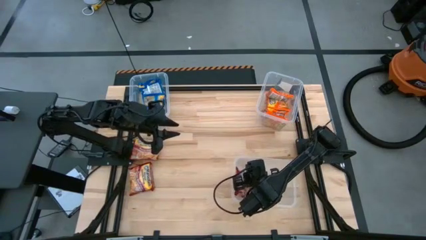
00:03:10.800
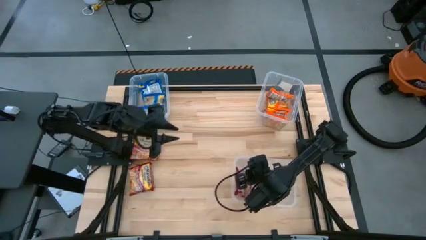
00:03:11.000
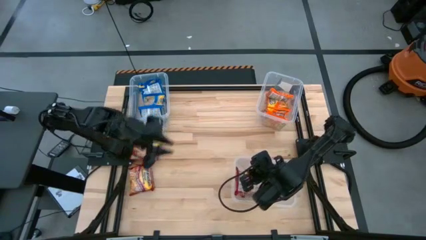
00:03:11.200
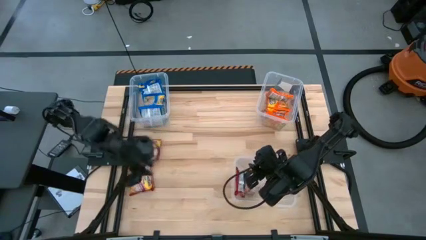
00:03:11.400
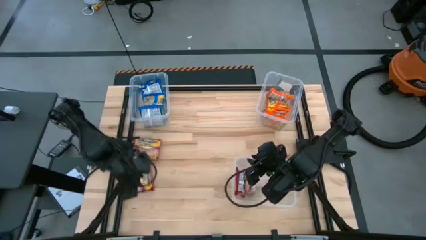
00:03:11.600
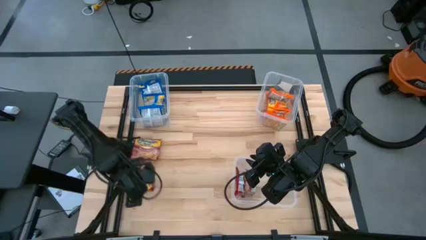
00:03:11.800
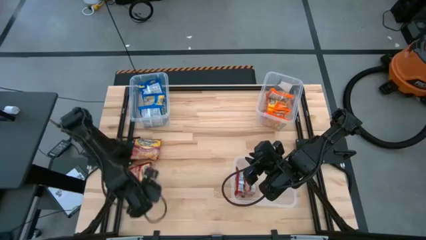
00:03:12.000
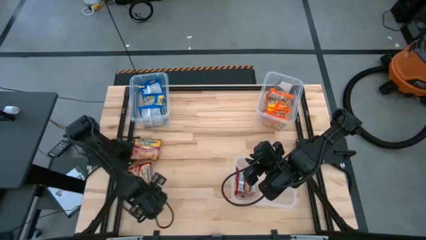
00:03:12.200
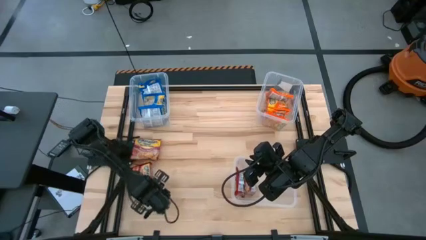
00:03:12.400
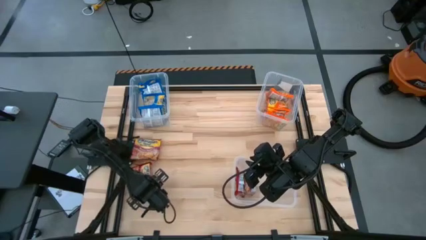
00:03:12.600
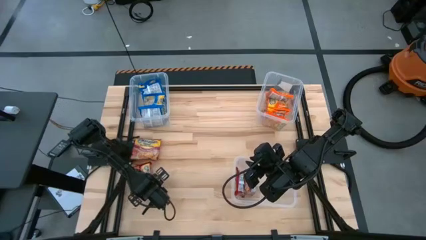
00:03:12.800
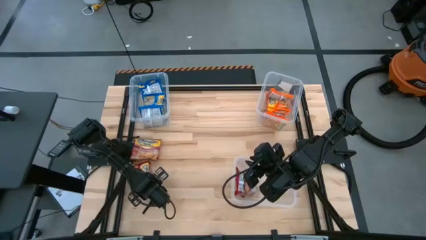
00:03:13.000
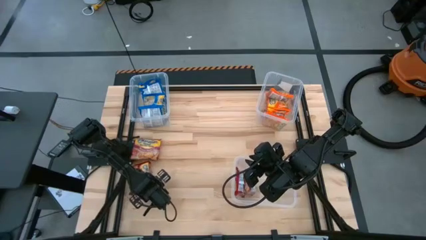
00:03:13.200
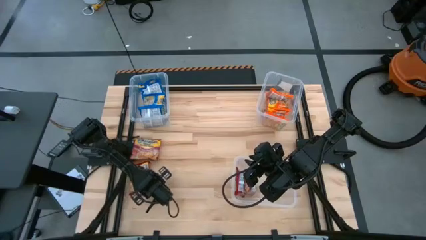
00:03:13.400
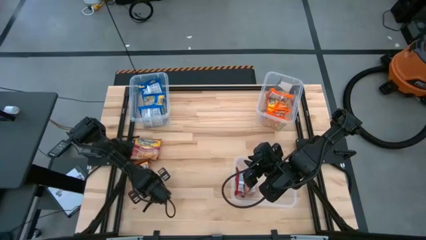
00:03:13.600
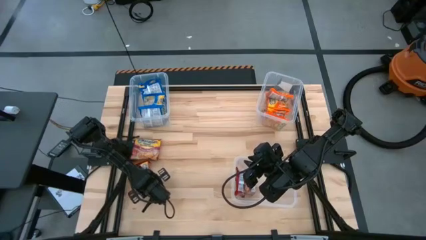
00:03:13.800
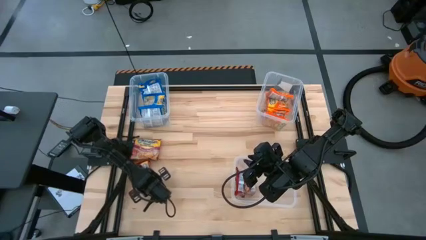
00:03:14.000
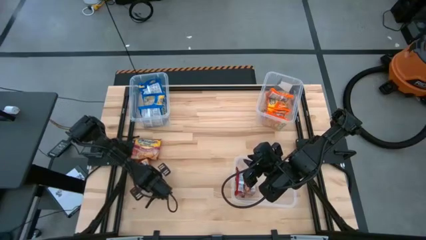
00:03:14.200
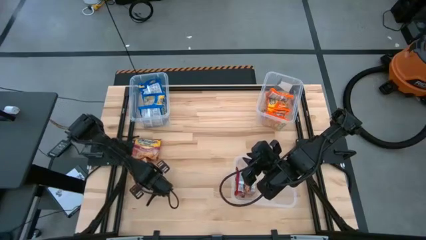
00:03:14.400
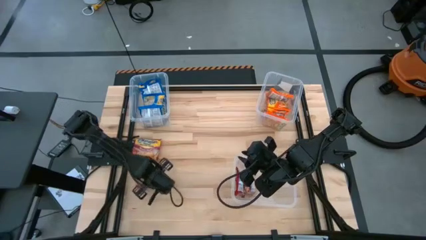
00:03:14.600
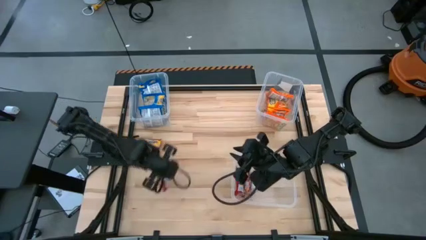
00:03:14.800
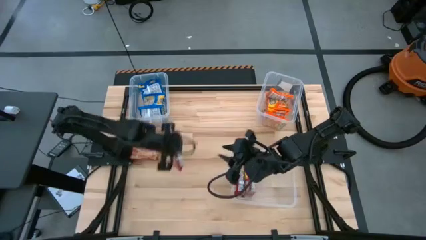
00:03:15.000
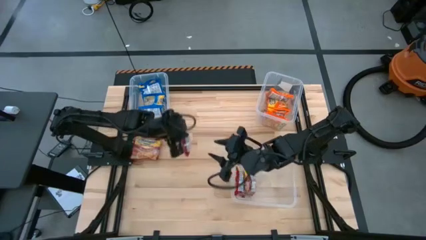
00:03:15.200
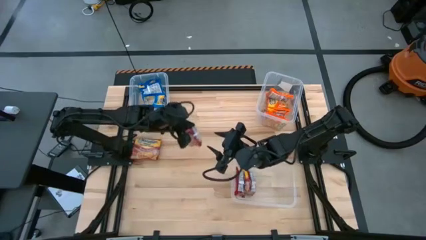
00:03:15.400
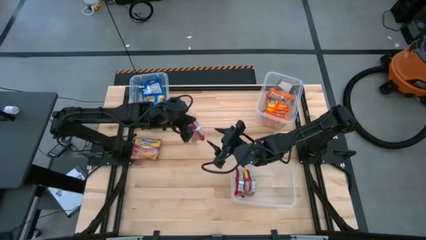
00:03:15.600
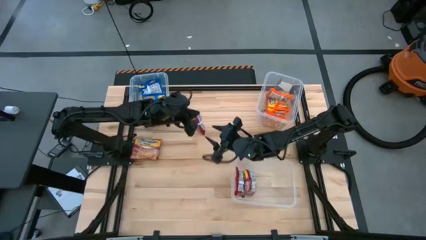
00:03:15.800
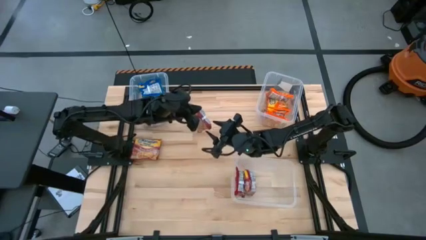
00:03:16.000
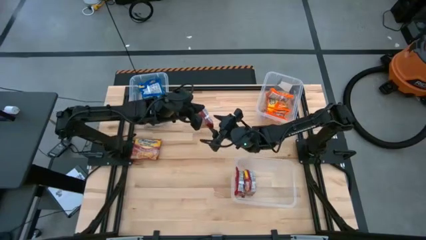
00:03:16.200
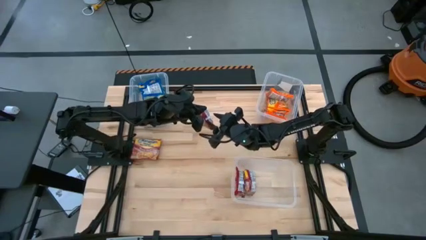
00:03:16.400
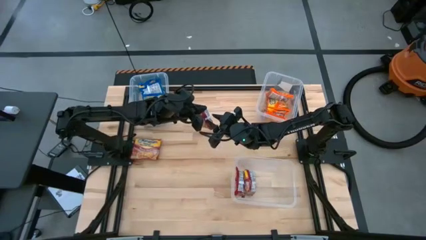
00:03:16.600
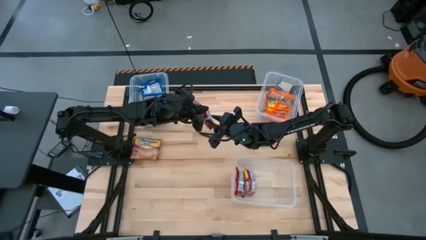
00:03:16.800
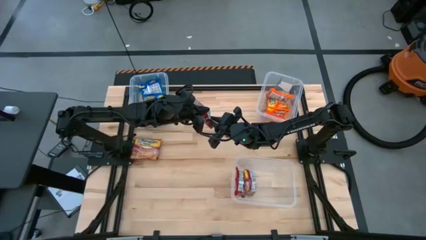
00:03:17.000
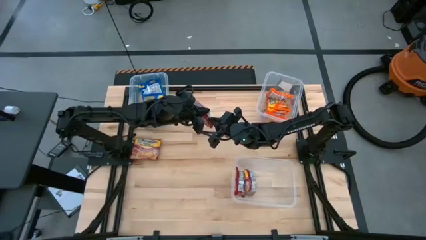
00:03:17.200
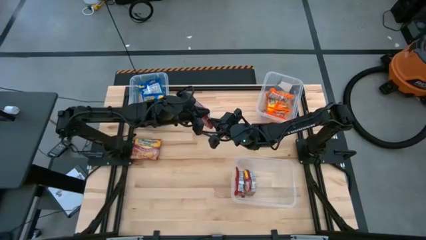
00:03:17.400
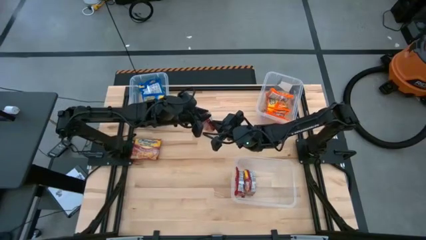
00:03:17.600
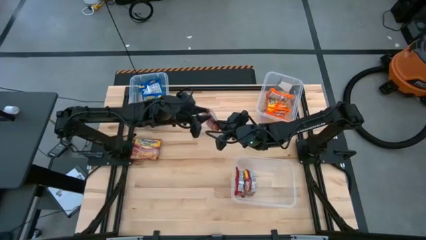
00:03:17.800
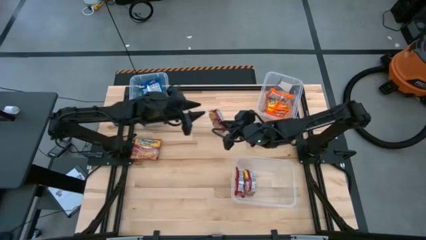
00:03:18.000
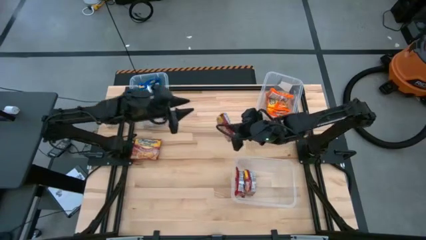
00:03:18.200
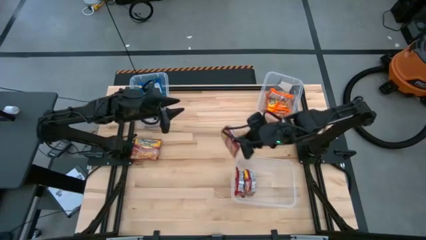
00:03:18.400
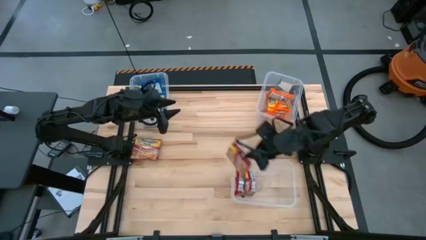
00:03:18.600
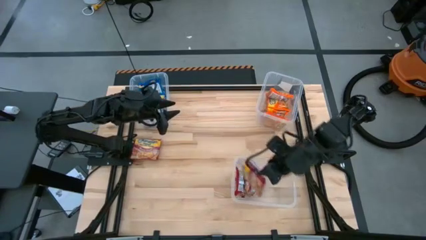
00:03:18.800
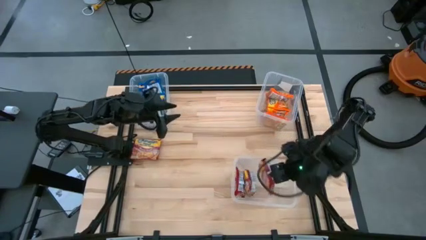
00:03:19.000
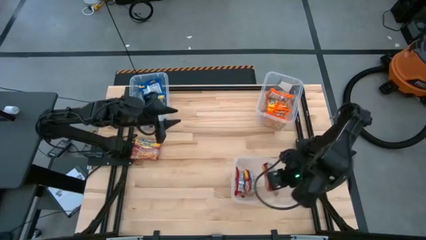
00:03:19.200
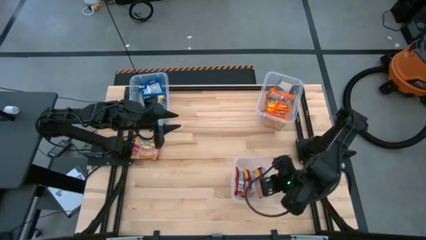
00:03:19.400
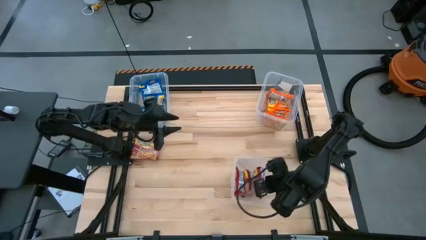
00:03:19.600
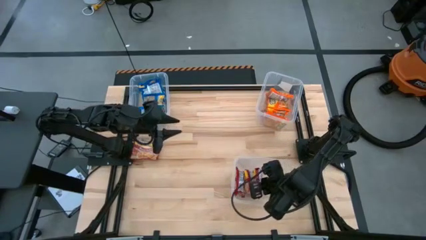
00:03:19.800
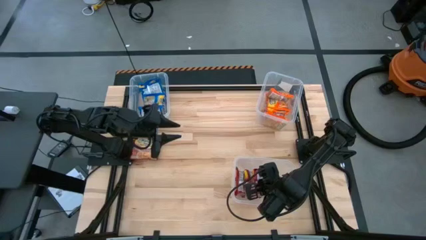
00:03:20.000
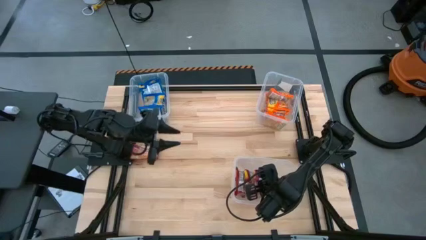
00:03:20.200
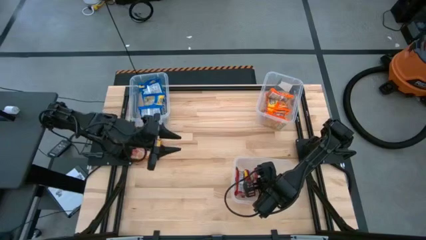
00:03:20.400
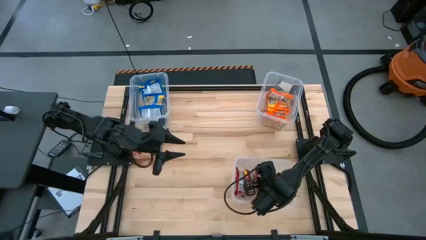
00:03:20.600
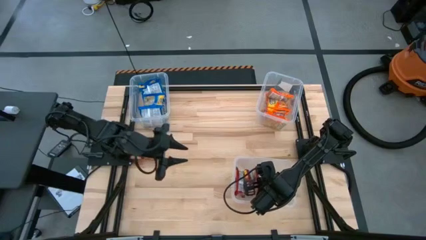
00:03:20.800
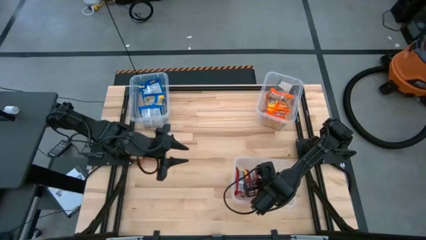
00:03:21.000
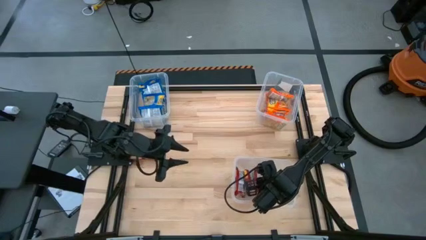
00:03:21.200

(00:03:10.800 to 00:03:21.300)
Task: Sort Maruchan noodles
Put the red noodle pack into the bottom transparent bin

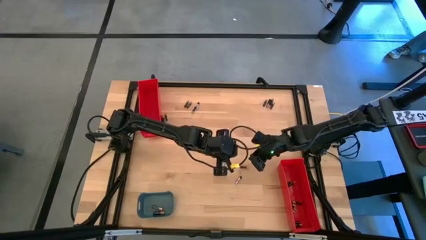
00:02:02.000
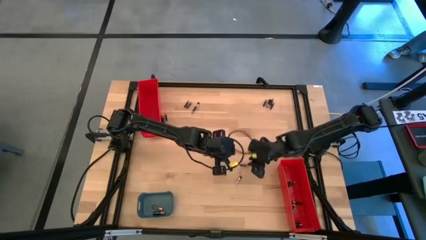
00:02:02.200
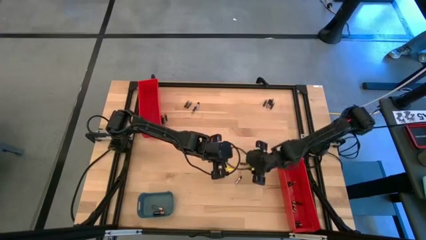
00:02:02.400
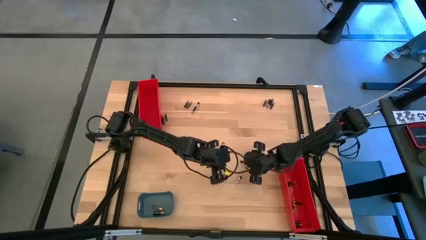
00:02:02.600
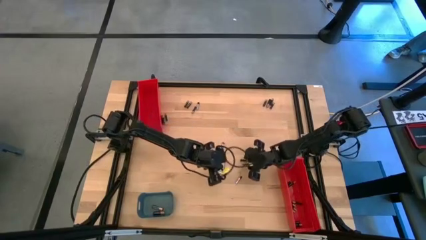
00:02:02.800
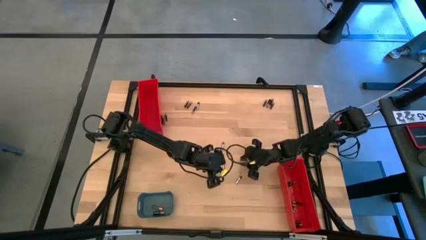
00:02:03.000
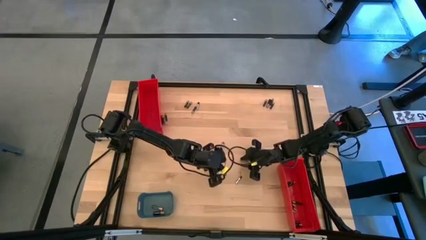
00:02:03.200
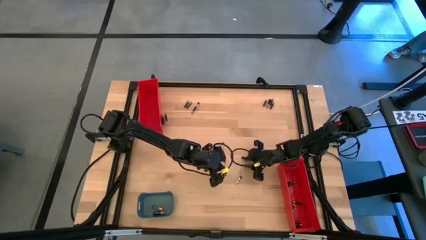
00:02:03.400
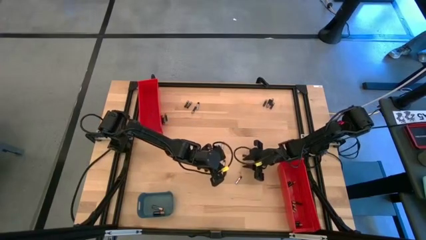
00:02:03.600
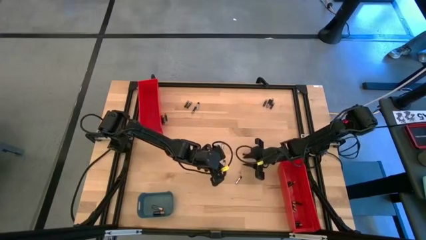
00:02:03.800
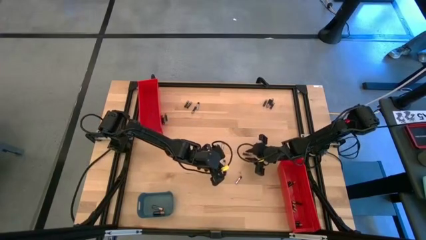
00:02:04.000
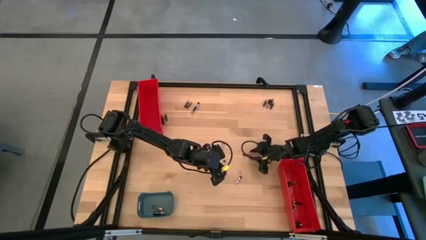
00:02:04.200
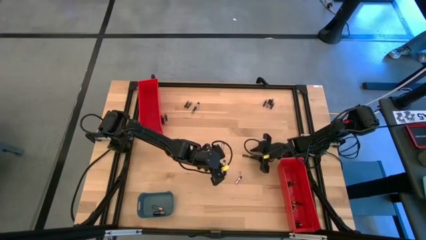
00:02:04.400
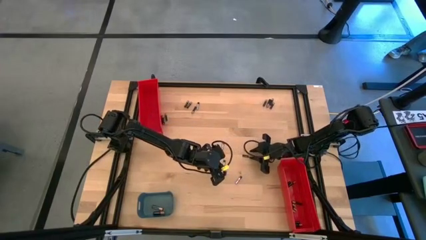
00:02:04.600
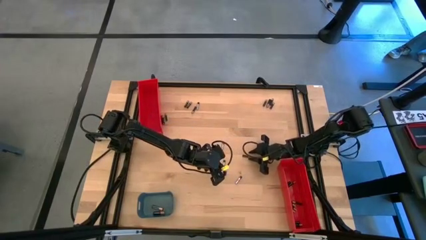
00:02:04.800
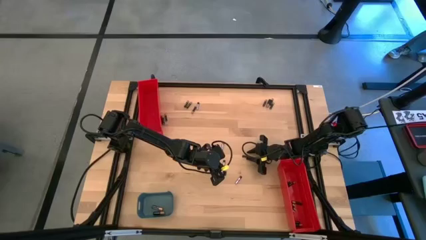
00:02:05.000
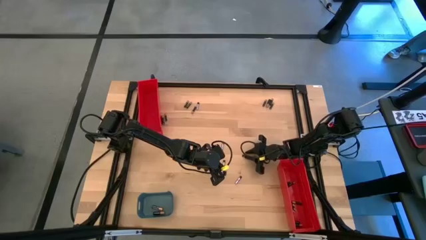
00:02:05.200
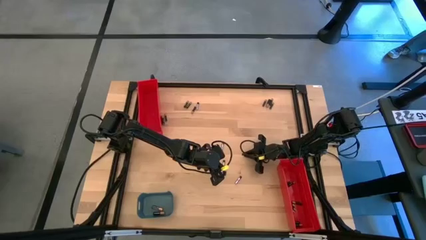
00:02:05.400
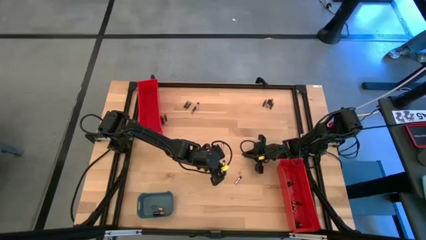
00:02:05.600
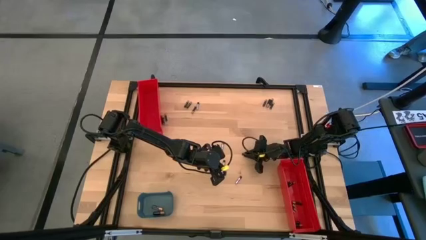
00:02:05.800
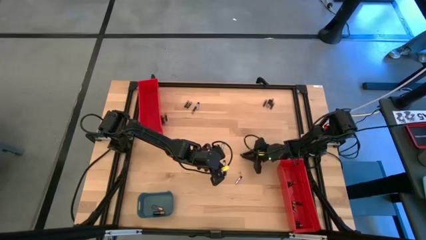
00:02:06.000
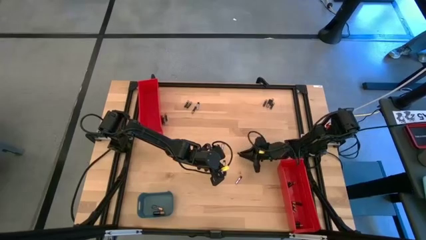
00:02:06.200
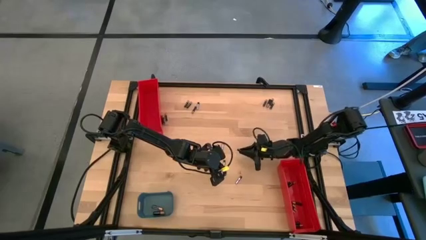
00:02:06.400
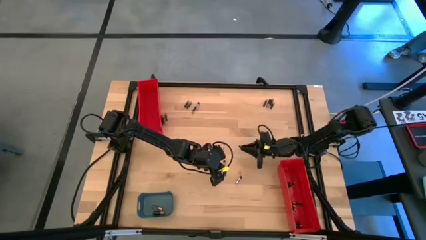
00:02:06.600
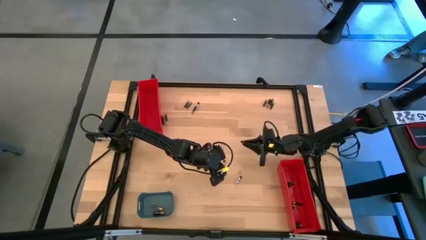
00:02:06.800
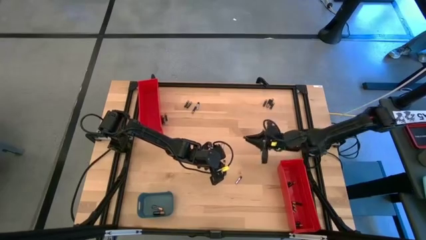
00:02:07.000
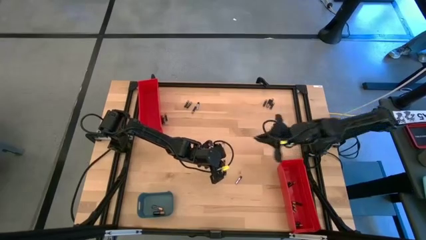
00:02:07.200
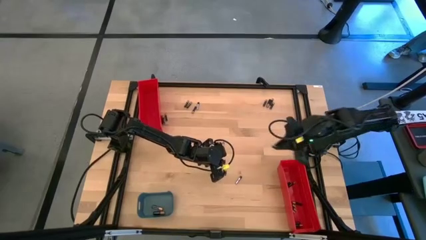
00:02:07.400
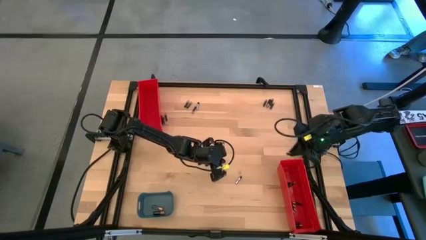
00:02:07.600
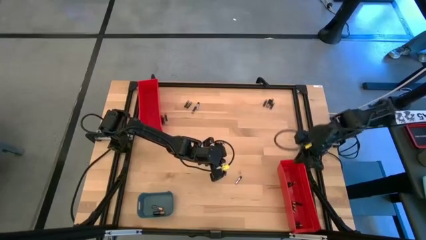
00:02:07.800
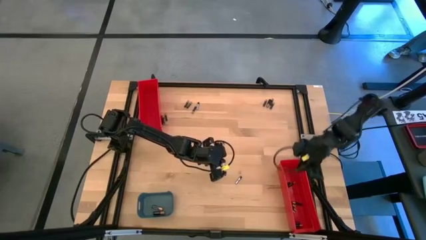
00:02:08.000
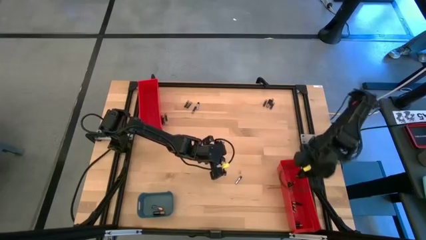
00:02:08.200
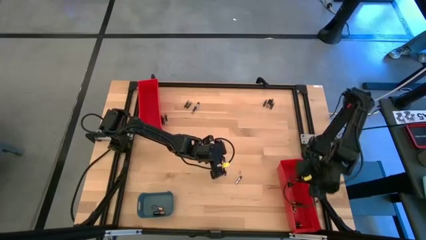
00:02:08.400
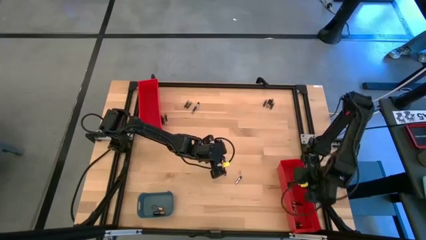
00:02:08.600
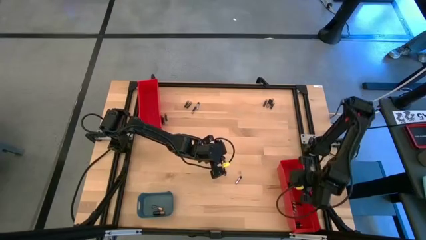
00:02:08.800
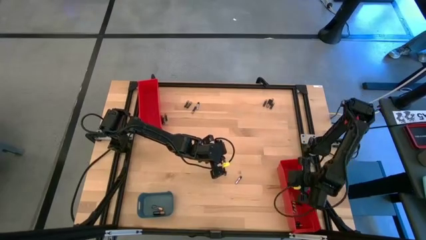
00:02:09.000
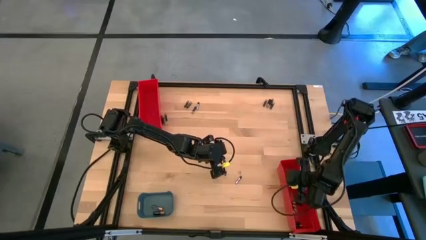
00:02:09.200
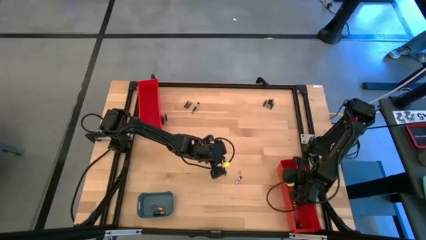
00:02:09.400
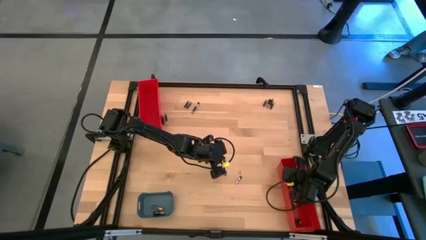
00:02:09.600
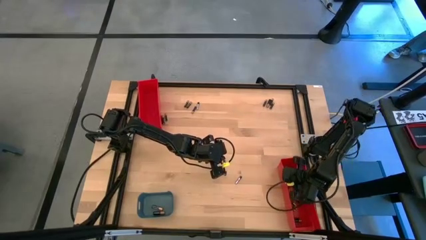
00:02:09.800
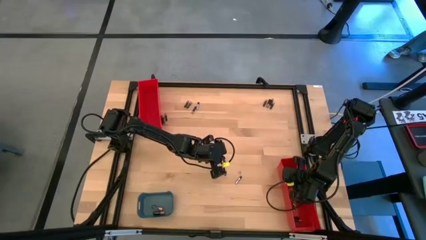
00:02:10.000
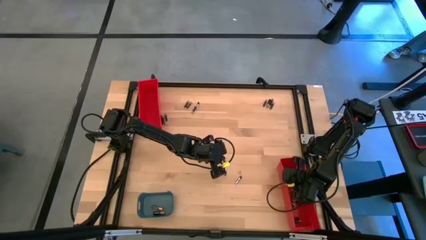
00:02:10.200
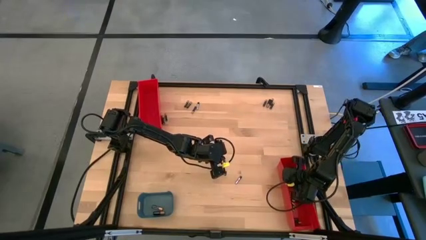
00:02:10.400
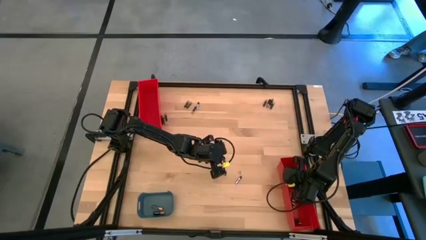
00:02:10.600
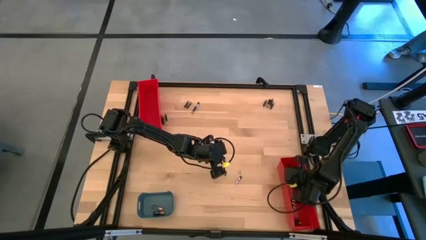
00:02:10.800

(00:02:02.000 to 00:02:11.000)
Task: Sort batteries
Put the small black battery into the bottom red bin
